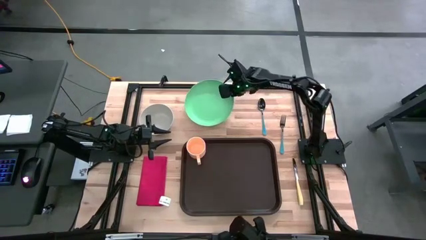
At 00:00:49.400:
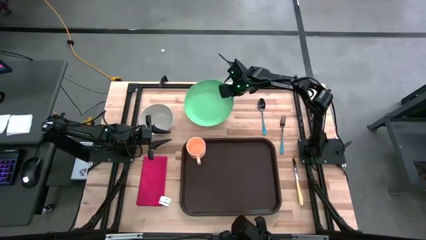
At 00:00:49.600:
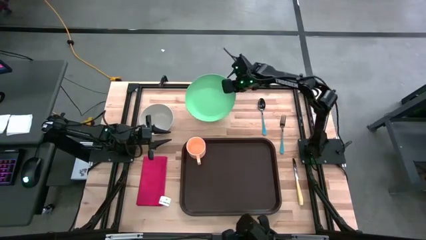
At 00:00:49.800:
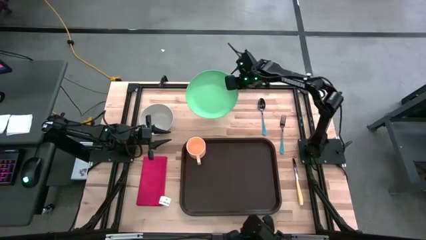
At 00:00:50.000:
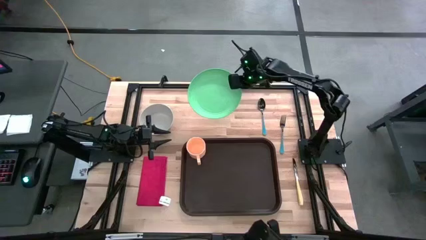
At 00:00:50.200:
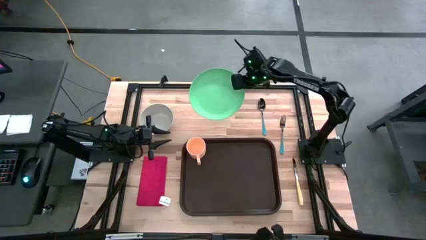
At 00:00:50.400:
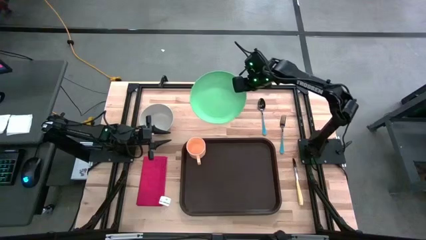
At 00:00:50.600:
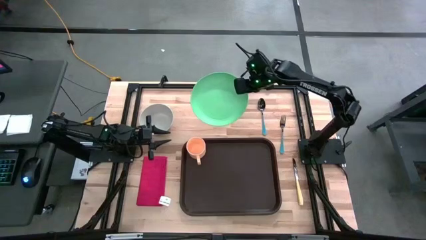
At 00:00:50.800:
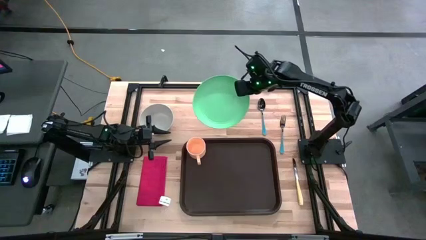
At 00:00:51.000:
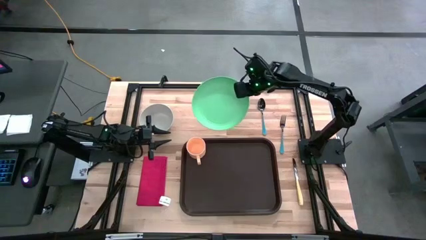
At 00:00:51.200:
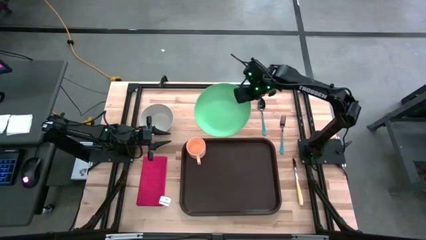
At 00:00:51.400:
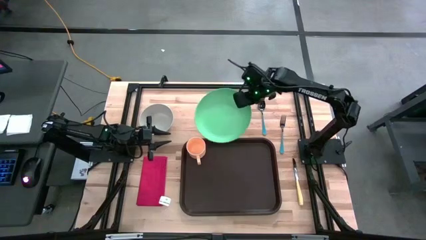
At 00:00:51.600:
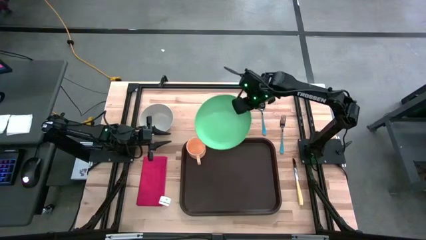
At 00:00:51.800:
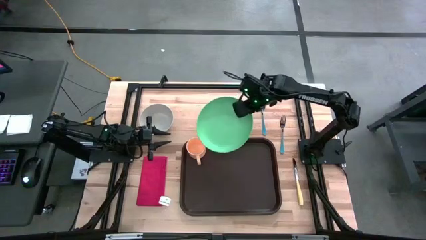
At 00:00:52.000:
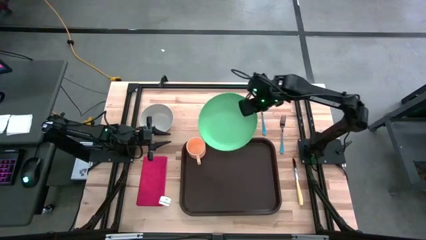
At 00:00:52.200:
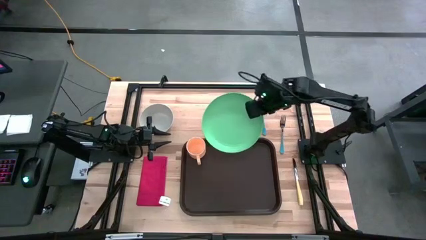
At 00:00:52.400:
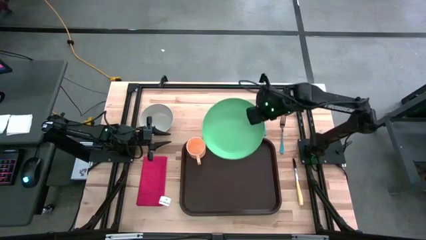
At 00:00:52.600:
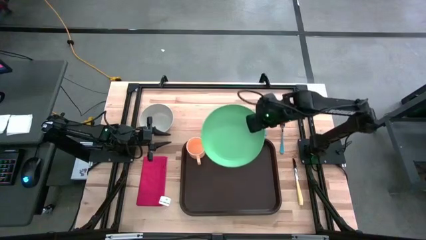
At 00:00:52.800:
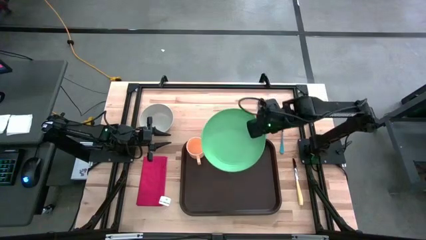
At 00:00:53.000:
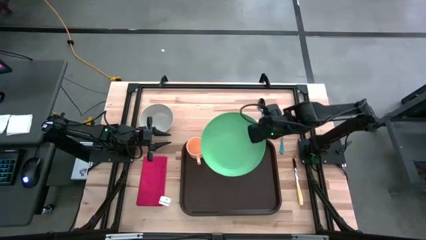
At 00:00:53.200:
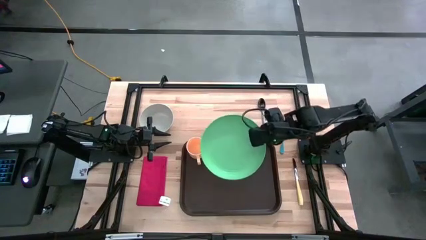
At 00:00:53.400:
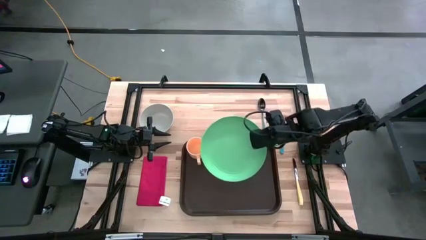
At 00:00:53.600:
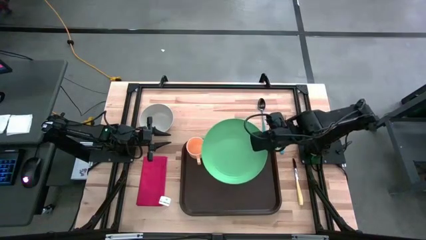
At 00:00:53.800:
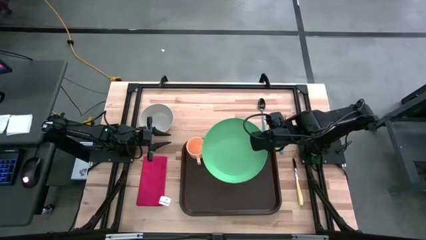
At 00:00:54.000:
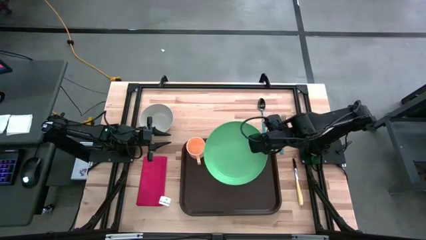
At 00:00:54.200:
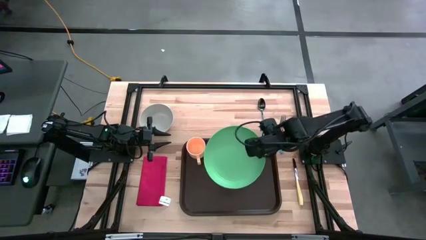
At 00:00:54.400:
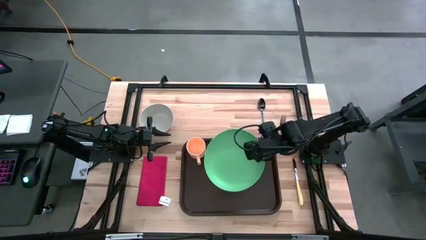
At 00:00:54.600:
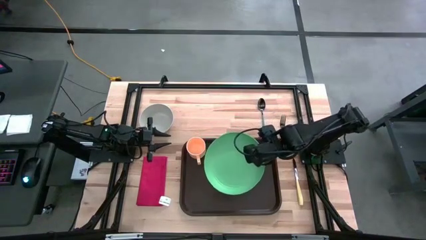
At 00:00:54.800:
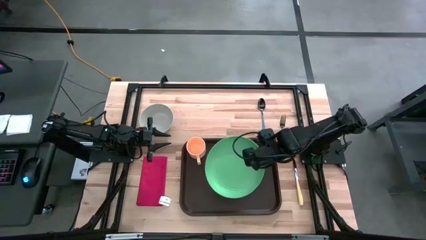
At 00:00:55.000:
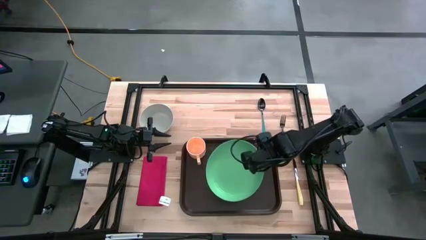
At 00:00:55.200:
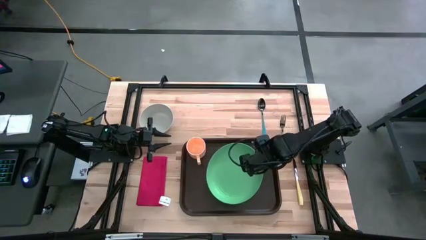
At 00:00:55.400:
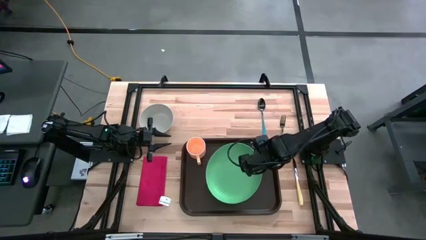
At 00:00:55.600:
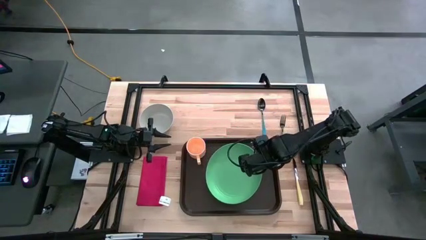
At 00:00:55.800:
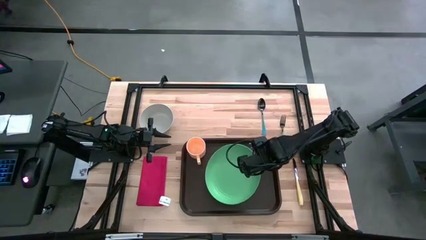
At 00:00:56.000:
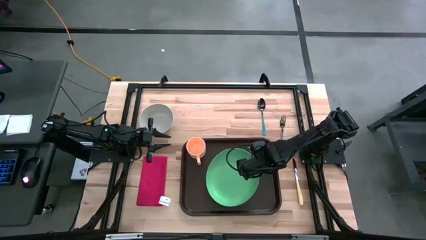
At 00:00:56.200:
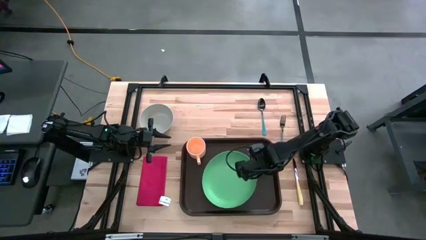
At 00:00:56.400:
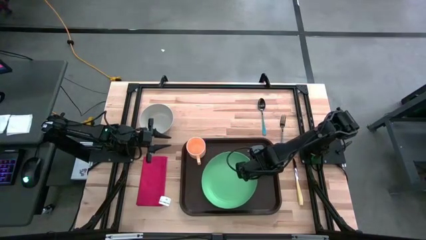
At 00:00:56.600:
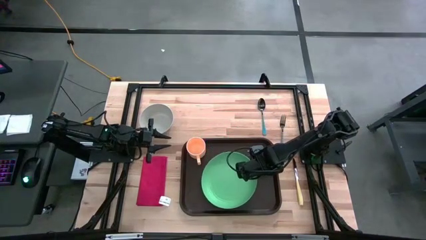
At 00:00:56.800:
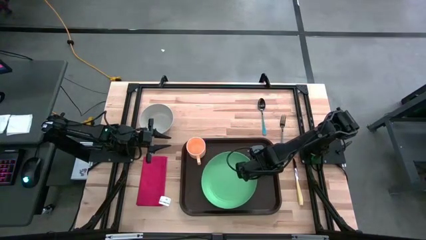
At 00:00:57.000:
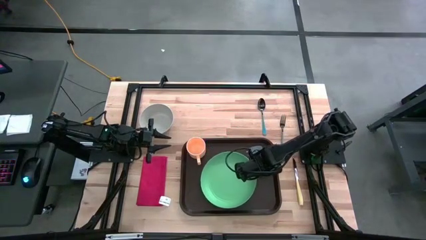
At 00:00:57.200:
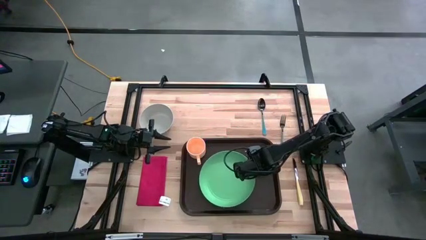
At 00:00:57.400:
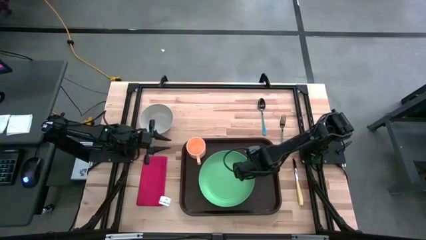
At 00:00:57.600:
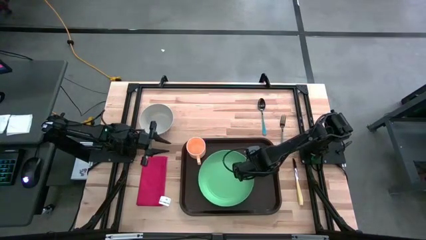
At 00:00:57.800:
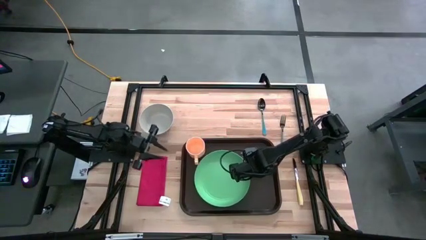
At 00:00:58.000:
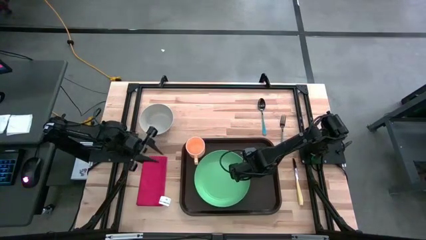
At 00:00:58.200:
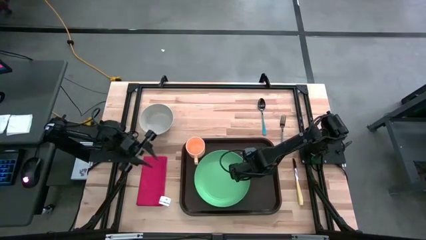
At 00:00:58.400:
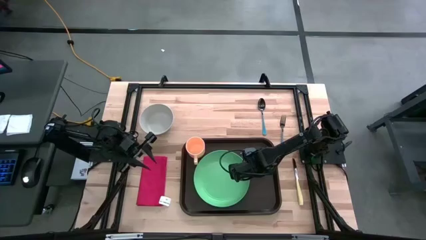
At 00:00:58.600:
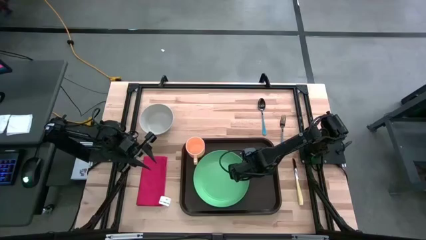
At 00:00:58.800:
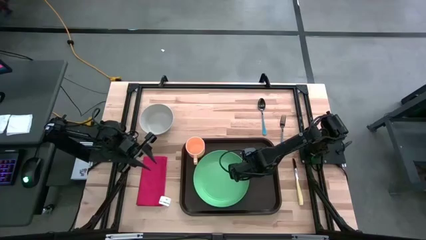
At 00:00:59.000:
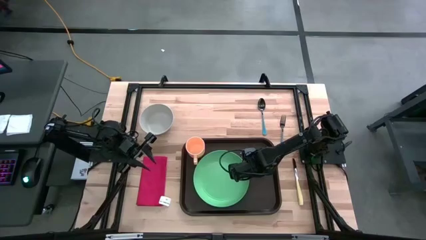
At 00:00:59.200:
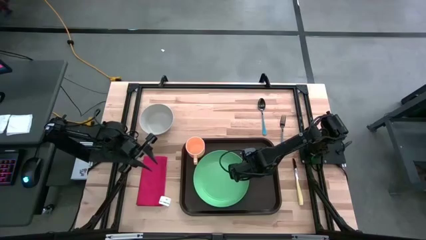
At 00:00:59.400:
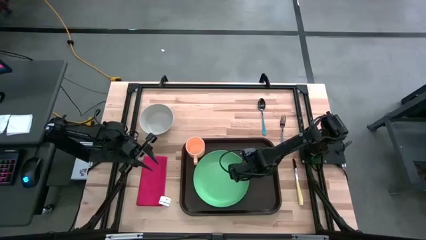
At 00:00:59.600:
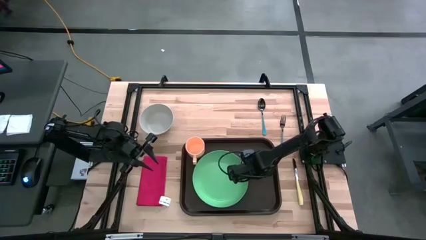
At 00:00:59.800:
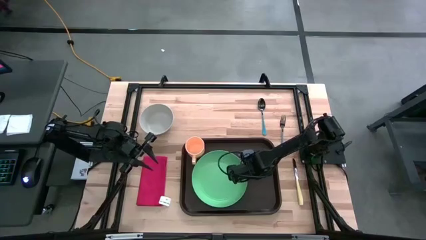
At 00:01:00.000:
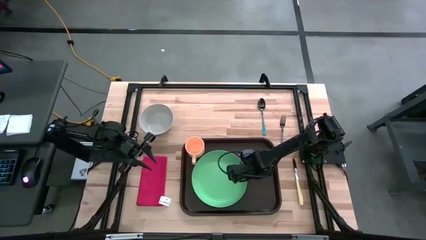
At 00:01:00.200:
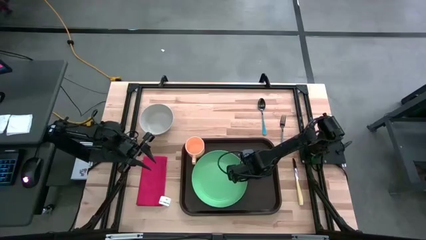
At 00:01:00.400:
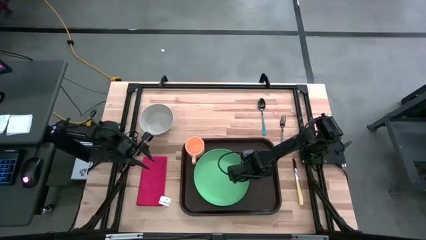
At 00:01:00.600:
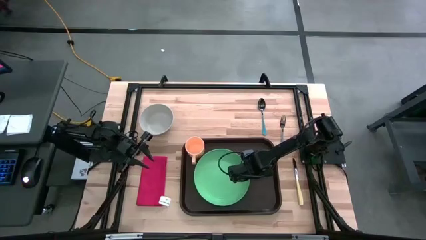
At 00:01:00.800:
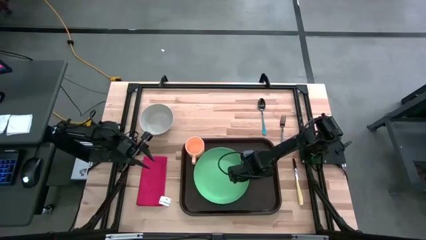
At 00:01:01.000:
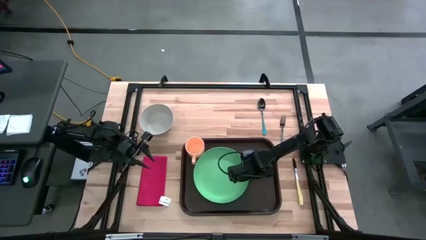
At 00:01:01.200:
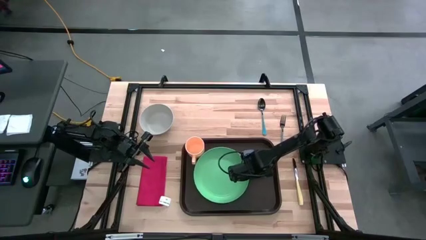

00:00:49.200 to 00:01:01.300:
Task: Set up tray
Put the green plate on the black tray to the bottom right of the orange mug
